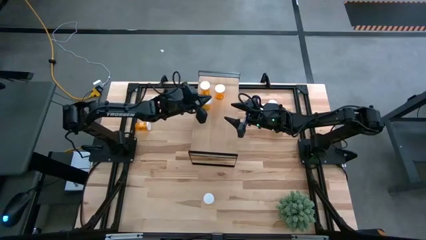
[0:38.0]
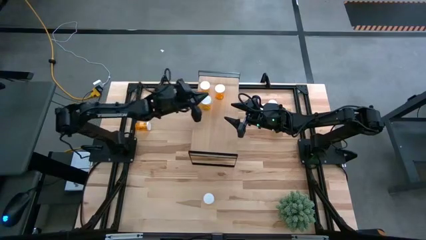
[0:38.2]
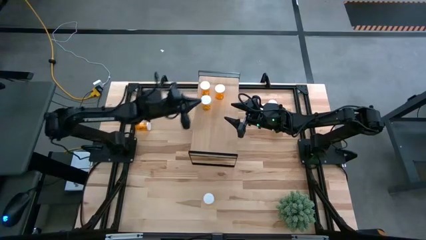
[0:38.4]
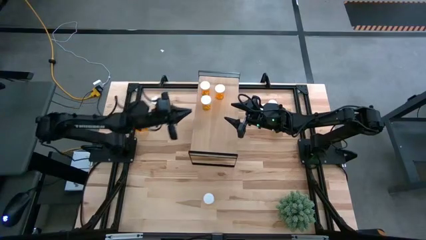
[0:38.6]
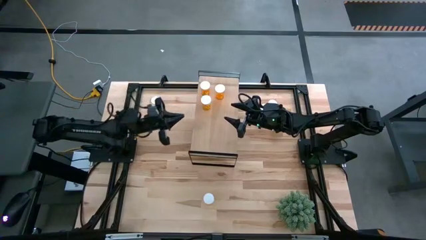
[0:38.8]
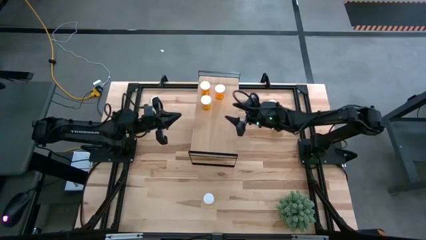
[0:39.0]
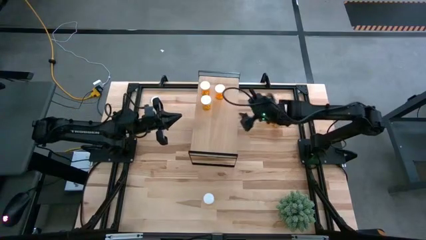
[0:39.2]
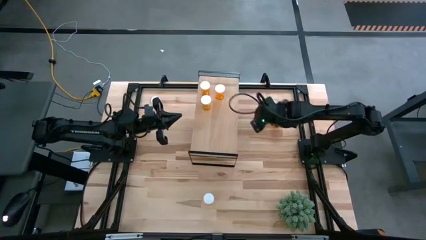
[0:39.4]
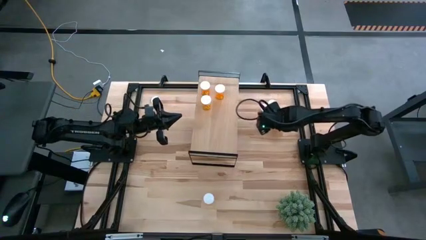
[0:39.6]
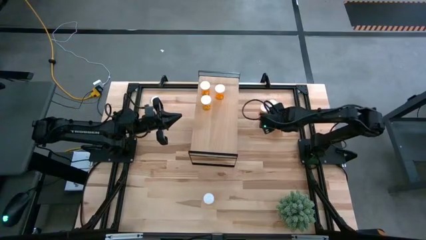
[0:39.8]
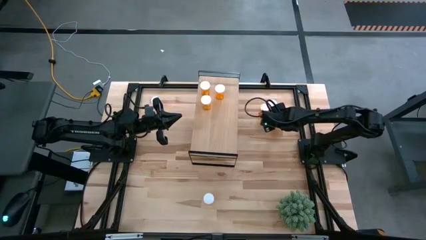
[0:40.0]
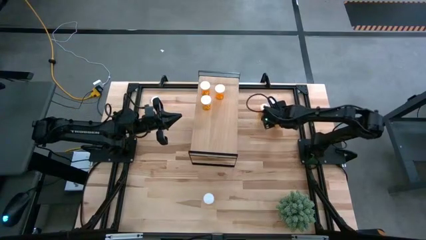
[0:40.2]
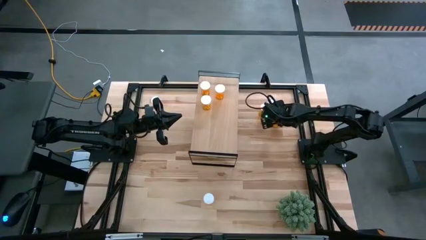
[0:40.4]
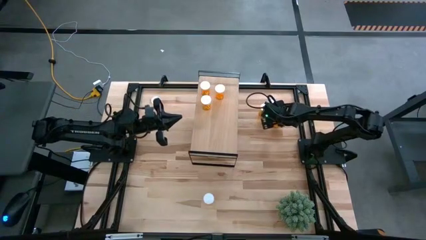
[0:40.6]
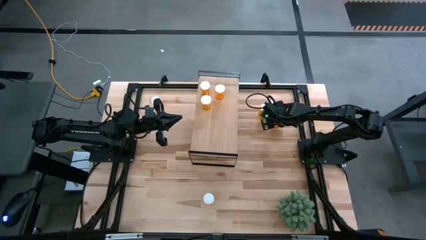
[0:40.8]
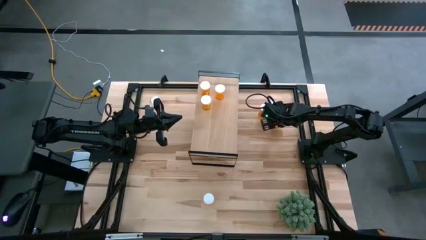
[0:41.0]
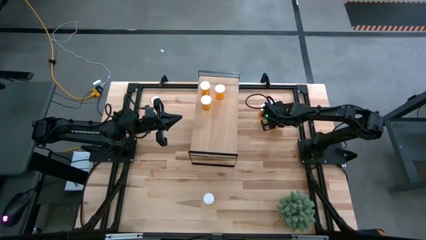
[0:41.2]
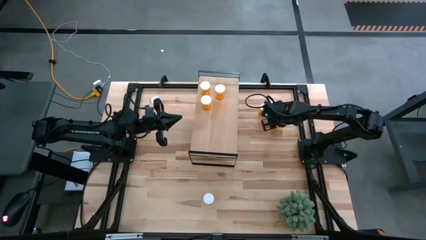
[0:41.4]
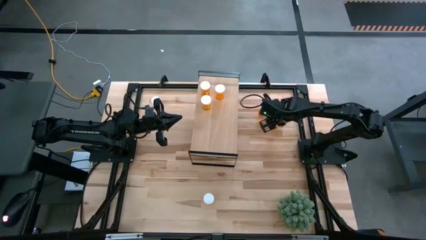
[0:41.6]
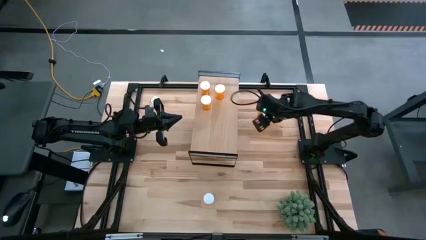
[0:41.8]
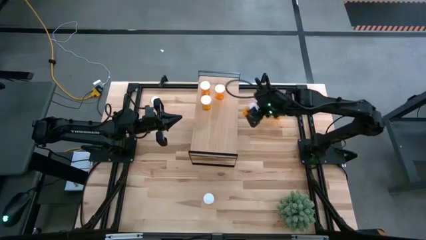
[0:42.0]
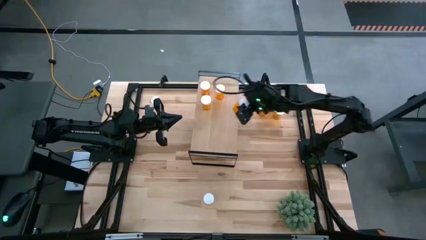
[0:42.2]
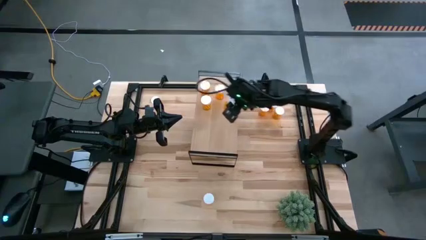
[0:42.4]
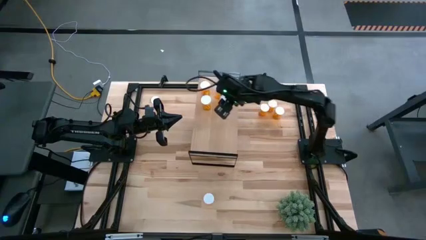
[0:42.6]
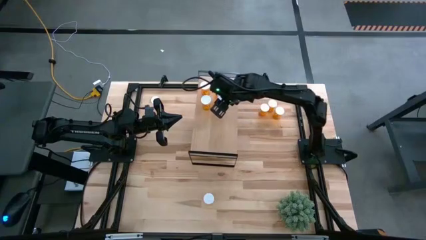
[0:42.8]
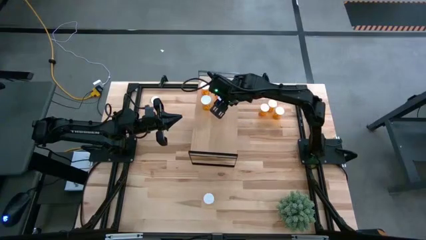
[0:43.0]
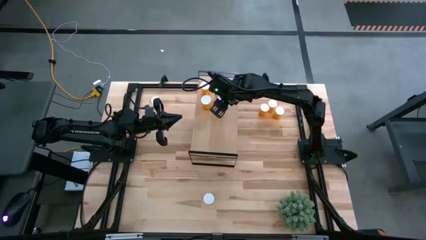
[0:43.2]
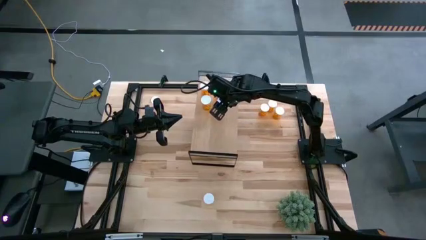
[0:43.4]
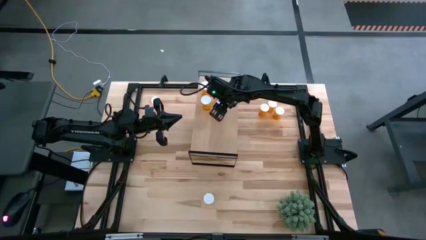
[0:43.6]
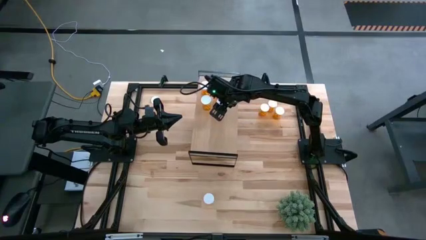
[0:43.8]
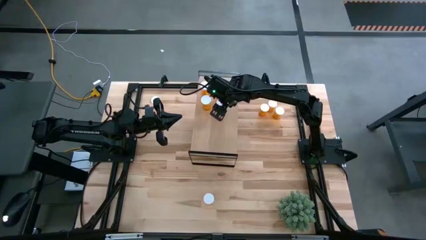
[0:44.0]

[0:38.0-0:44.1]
Task: Pick and place medicine bottles onto shelf by color
Put the orange pill bottle on the shelf

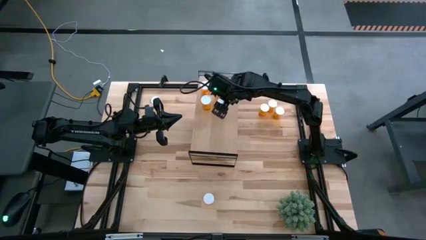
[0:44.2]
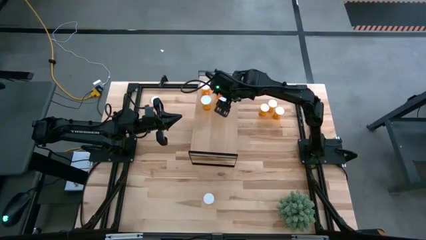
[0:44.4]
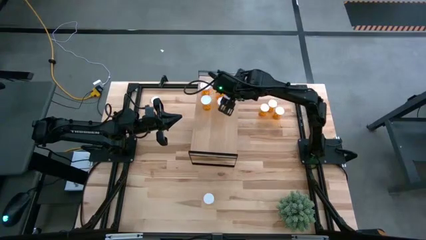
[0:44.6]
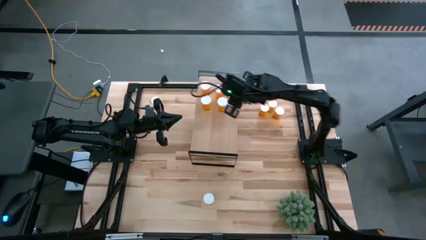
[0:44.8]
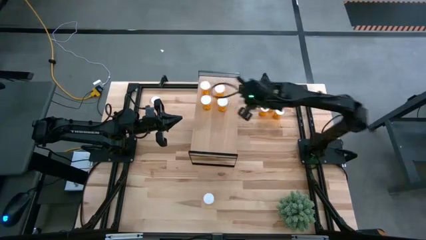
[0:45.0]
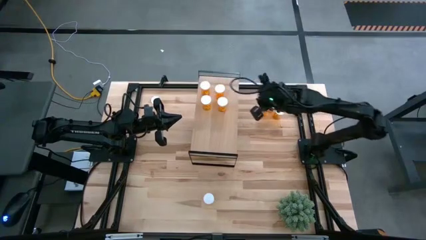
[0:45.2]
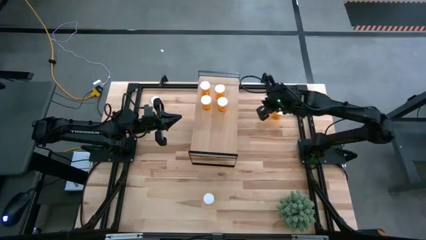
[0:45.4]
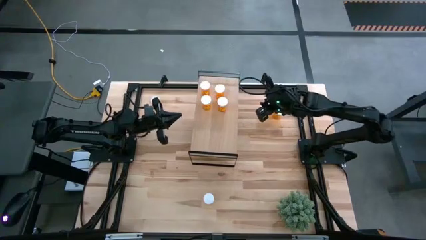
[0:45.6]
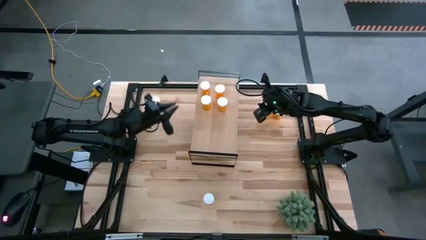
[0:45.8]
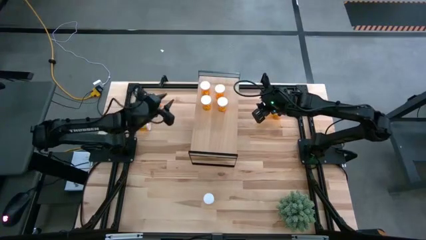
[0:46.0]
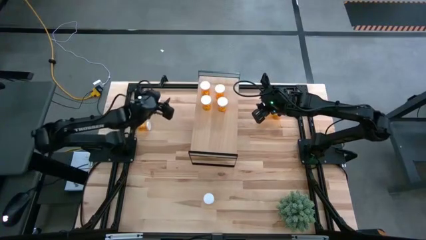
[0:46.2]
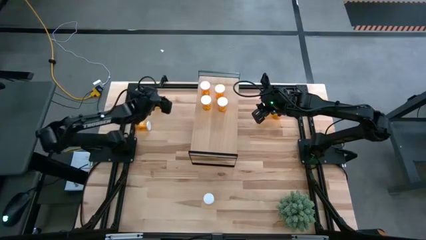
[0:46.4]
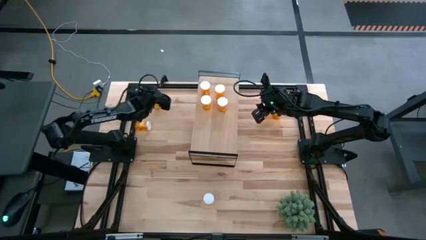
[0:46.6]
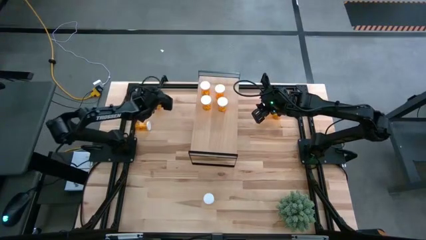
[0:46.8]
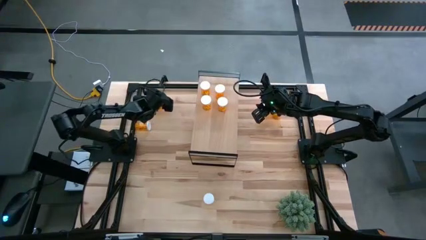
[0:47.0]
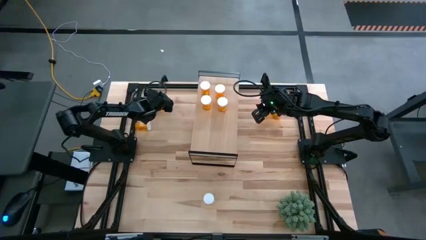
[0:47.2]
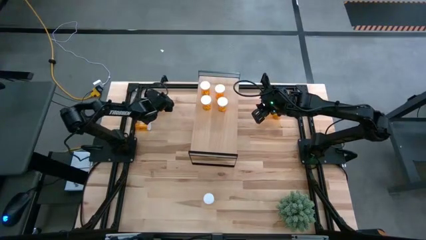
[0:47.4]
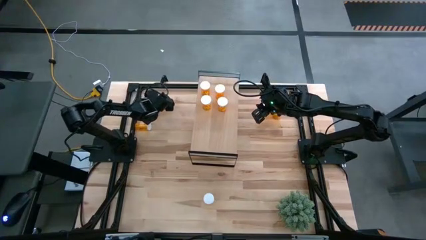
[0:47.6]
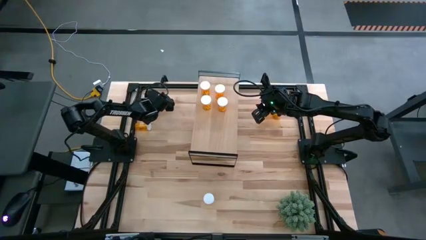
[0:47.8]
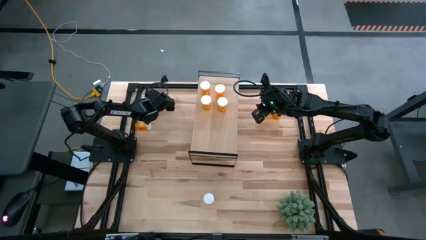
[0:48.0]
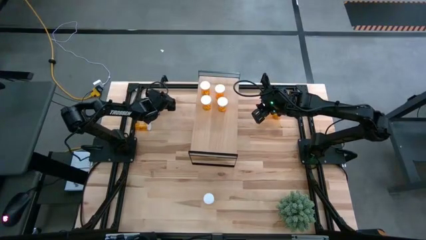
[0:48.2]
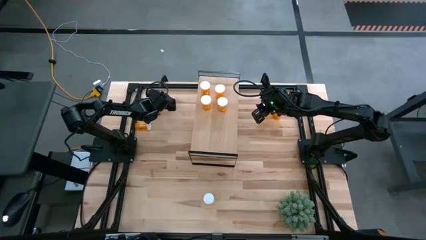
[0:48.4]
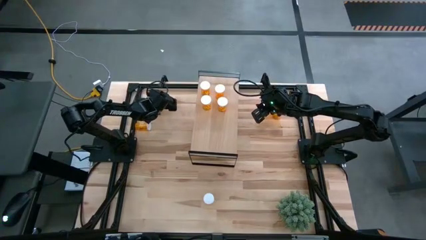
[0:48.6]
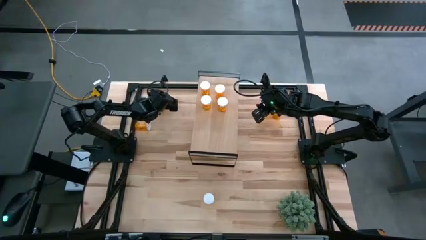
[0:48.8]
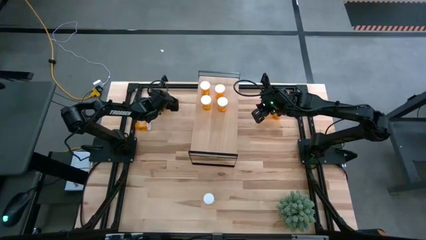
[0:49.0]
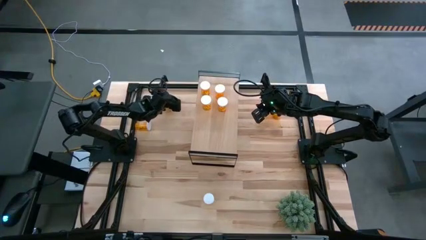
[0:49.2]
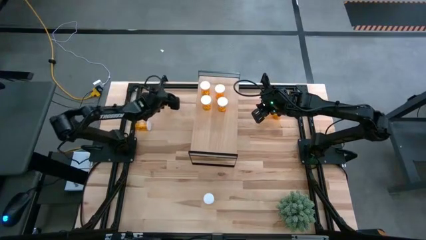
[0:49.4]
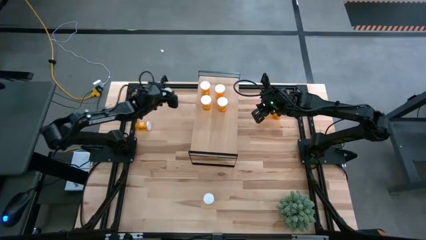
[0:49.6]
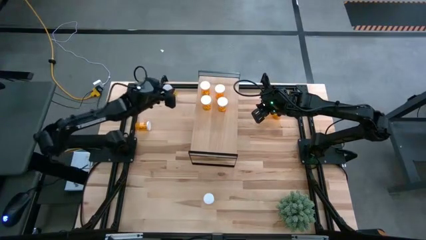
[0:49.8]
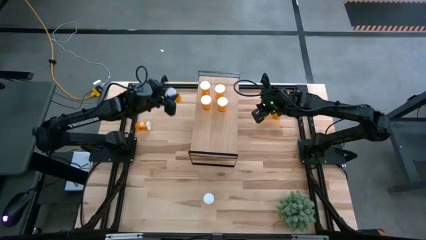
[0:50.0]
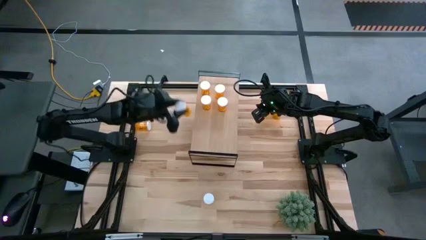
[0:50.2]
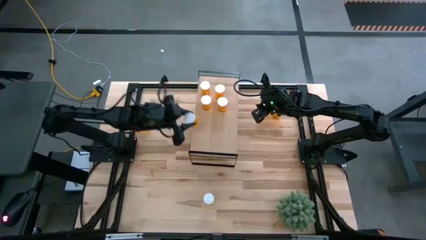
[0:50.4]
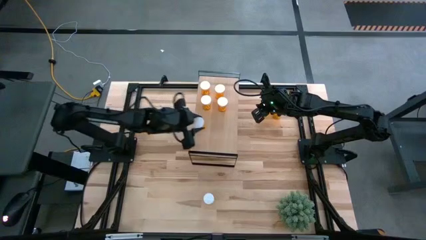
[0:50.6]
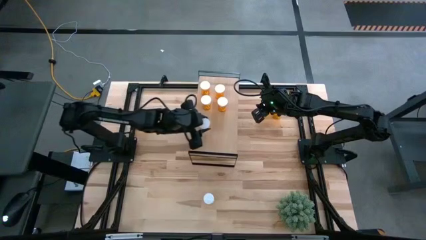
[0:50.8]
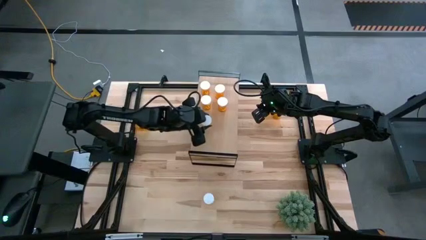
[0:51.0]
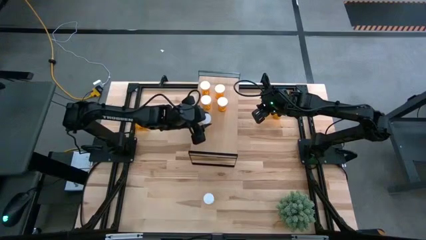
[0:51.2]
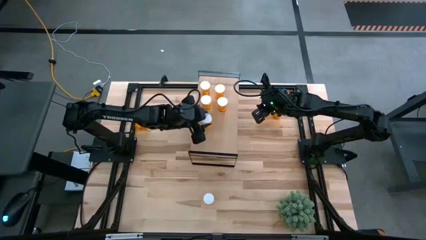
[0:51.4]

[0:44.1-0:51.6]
Put the orange pill bottle on the shelf
